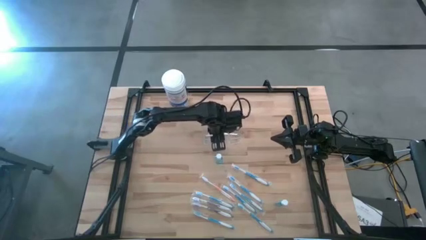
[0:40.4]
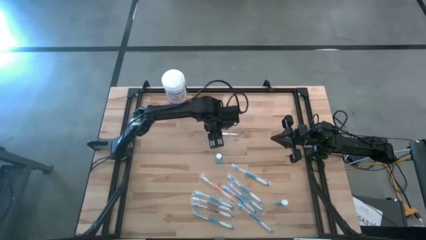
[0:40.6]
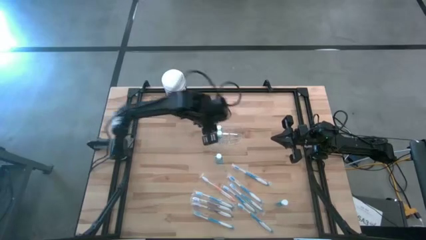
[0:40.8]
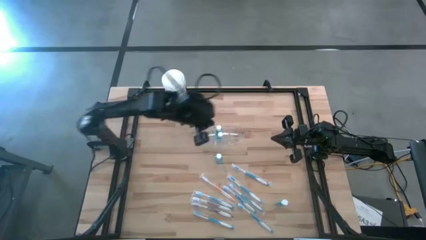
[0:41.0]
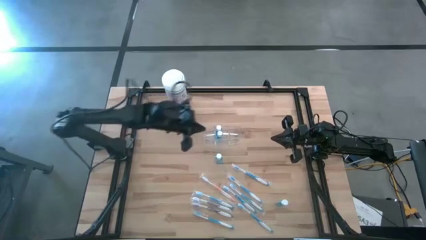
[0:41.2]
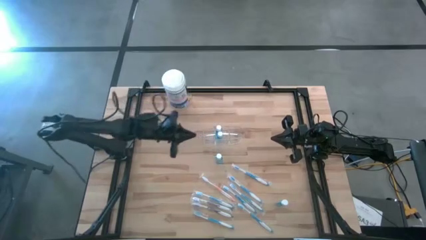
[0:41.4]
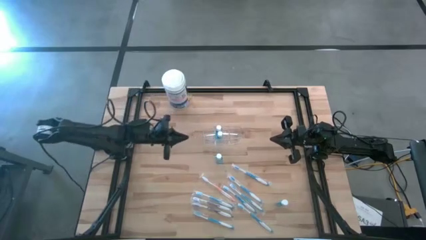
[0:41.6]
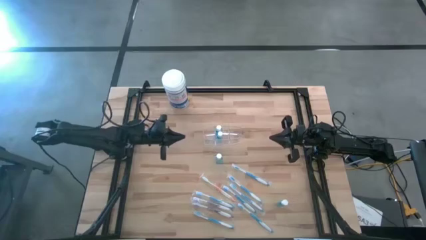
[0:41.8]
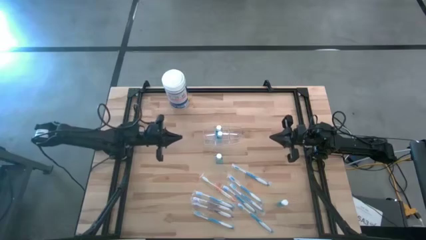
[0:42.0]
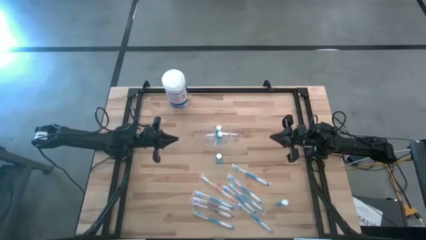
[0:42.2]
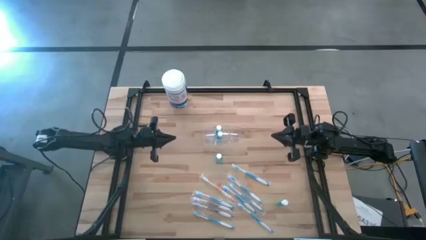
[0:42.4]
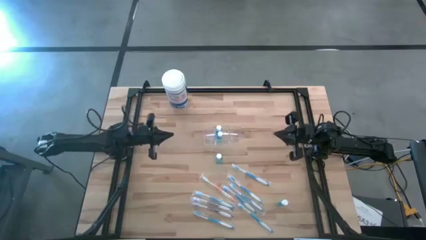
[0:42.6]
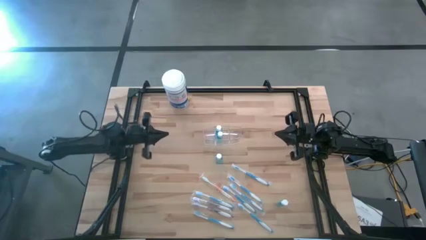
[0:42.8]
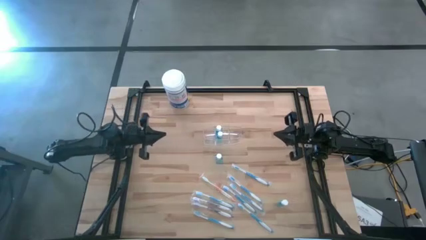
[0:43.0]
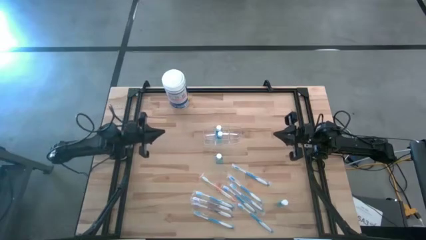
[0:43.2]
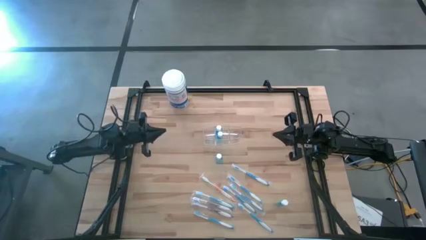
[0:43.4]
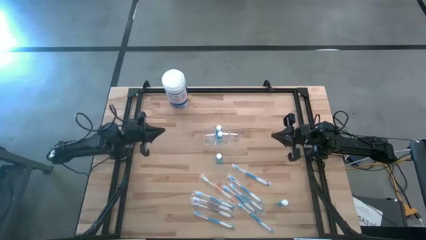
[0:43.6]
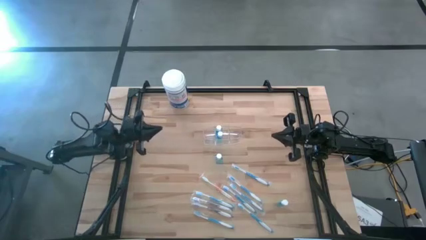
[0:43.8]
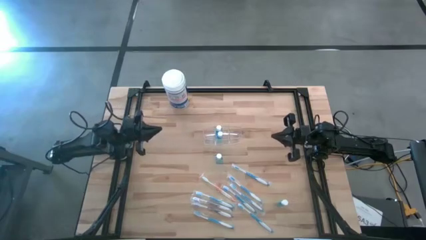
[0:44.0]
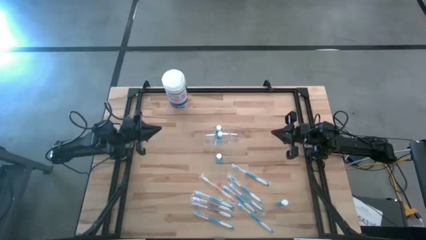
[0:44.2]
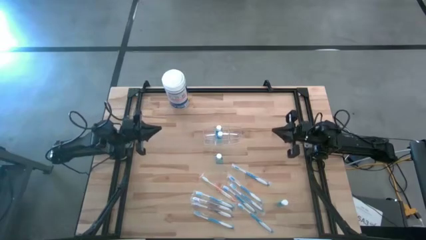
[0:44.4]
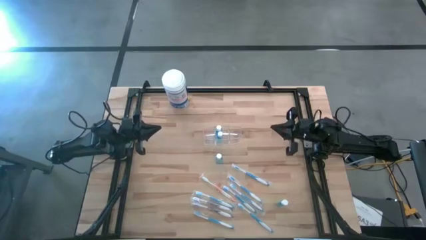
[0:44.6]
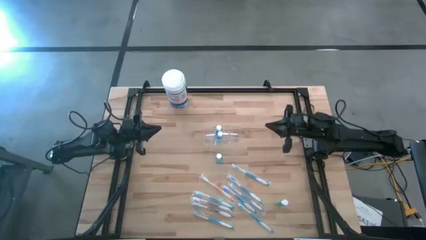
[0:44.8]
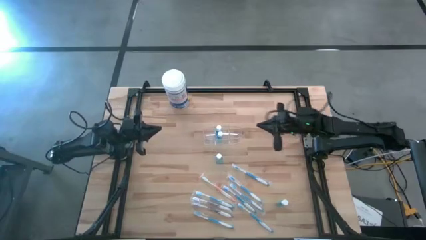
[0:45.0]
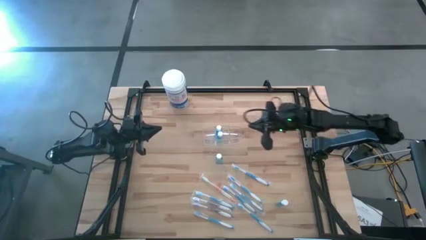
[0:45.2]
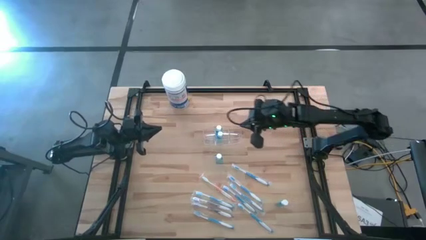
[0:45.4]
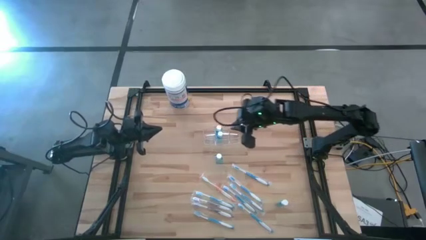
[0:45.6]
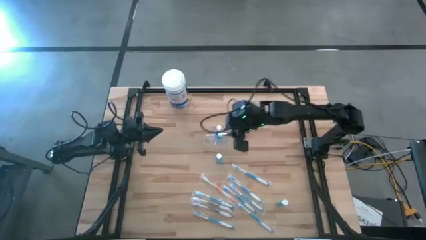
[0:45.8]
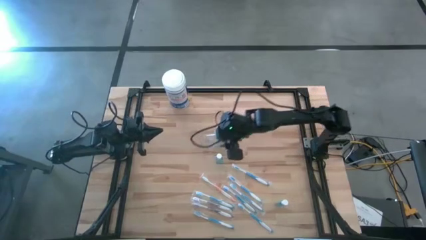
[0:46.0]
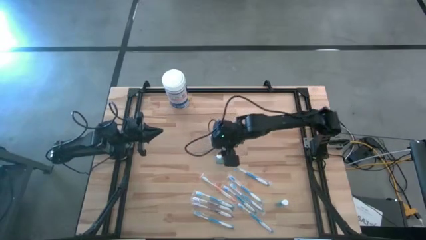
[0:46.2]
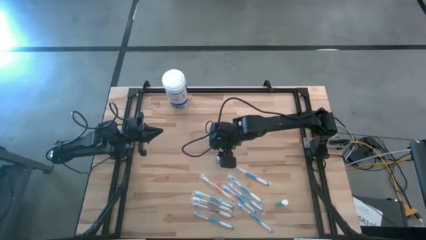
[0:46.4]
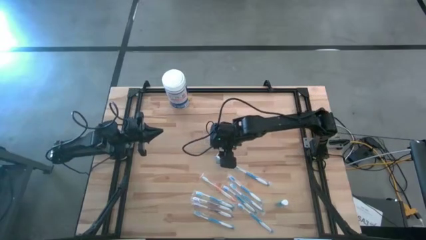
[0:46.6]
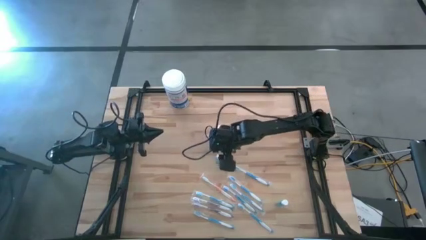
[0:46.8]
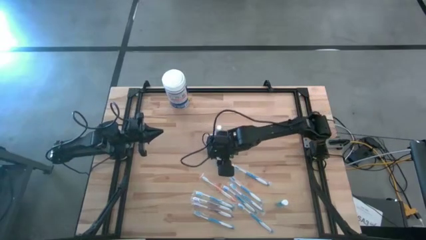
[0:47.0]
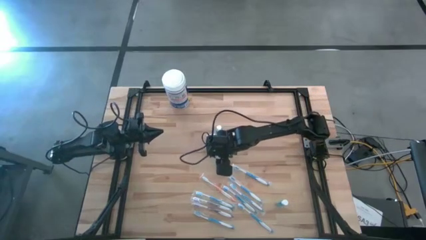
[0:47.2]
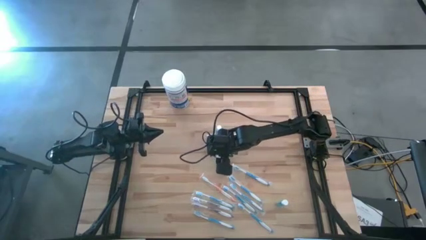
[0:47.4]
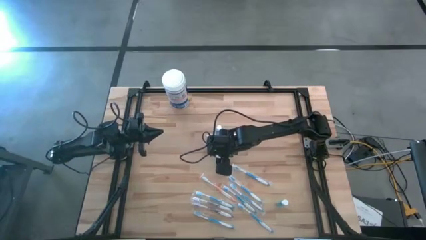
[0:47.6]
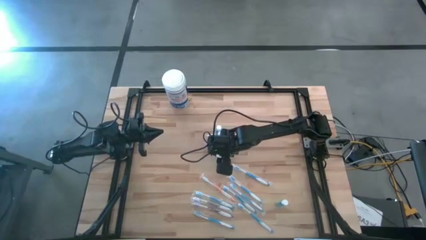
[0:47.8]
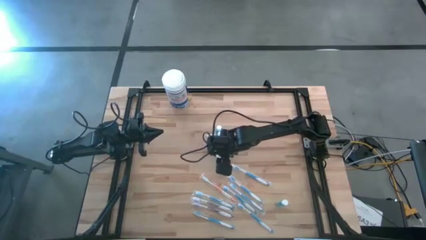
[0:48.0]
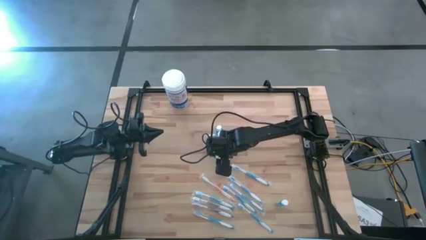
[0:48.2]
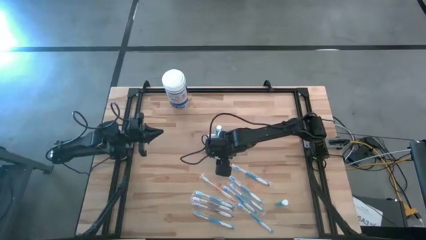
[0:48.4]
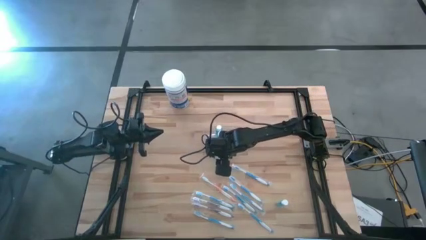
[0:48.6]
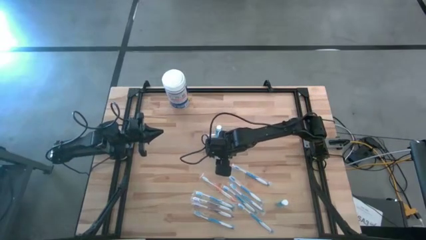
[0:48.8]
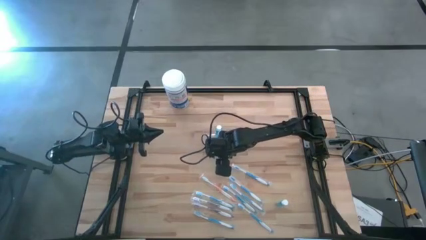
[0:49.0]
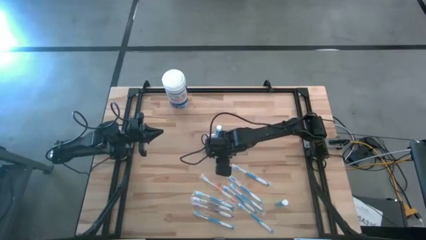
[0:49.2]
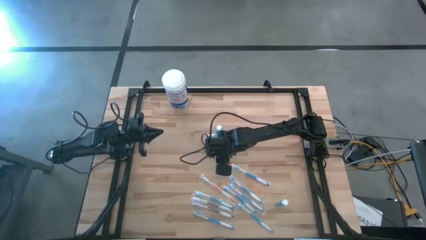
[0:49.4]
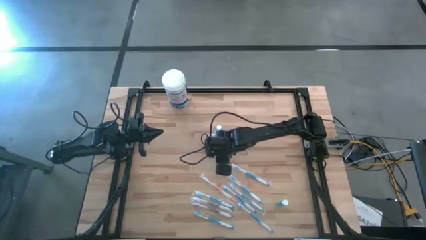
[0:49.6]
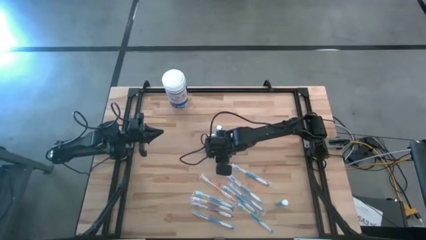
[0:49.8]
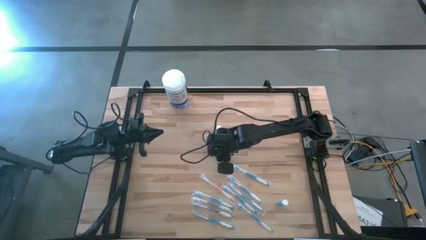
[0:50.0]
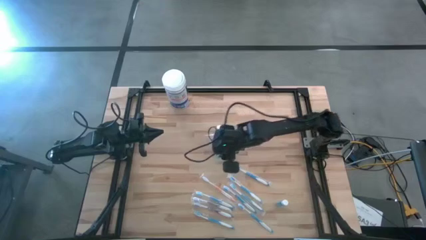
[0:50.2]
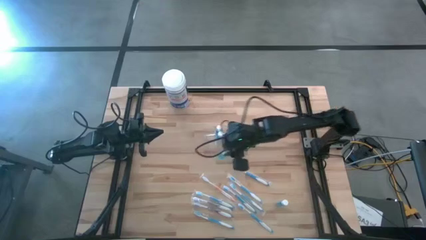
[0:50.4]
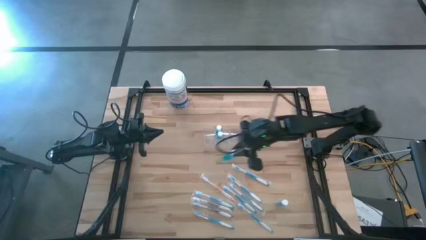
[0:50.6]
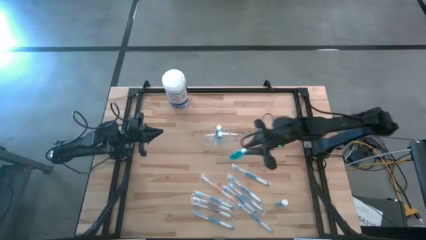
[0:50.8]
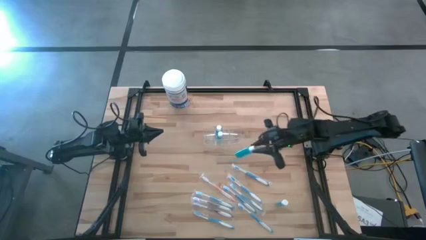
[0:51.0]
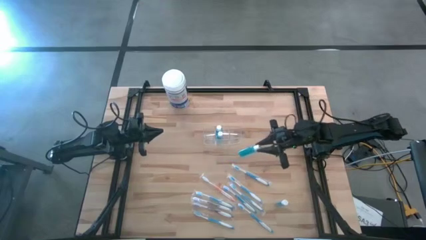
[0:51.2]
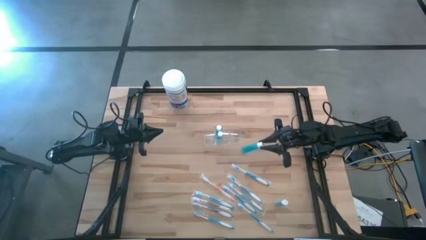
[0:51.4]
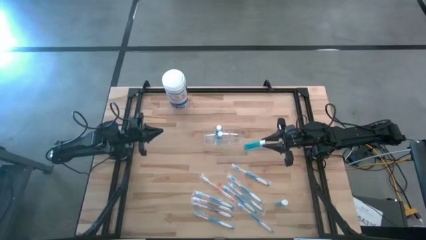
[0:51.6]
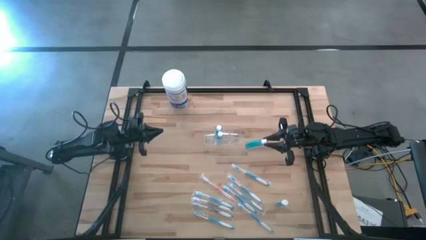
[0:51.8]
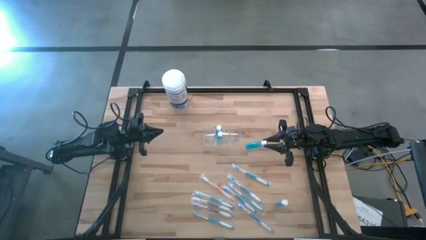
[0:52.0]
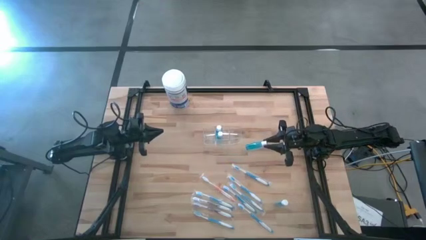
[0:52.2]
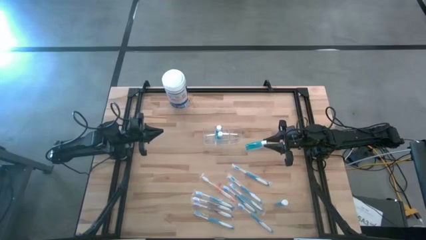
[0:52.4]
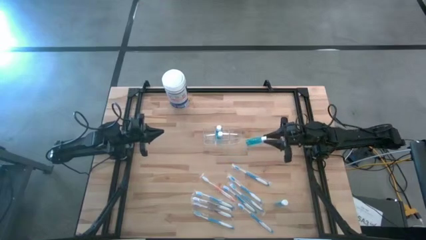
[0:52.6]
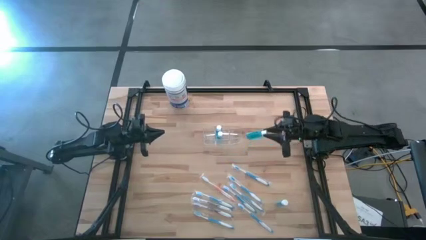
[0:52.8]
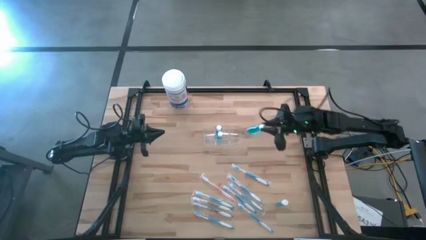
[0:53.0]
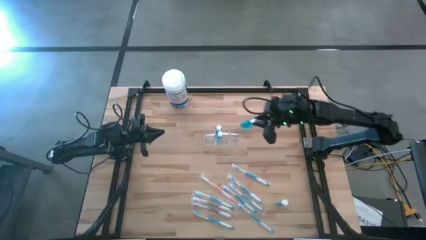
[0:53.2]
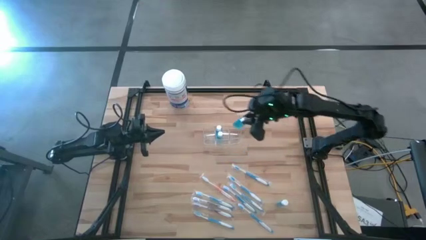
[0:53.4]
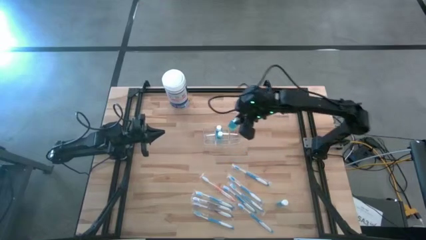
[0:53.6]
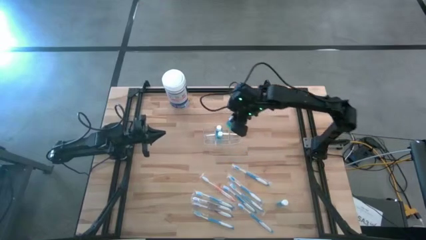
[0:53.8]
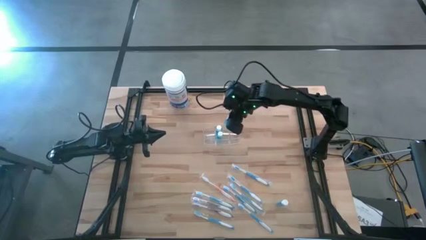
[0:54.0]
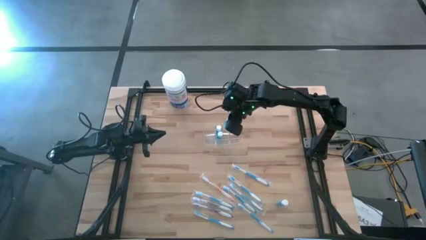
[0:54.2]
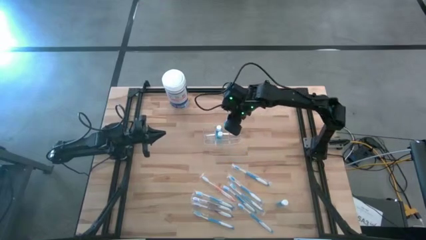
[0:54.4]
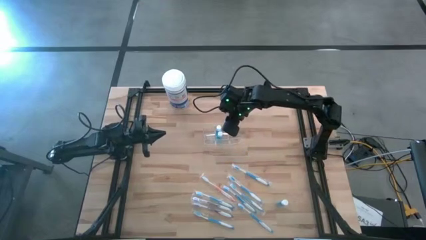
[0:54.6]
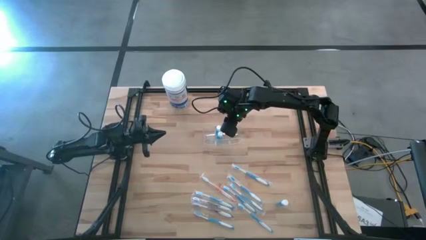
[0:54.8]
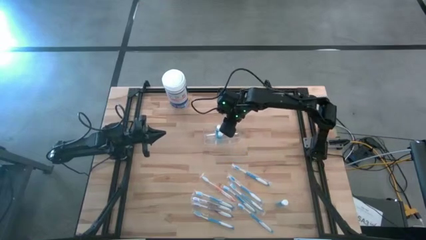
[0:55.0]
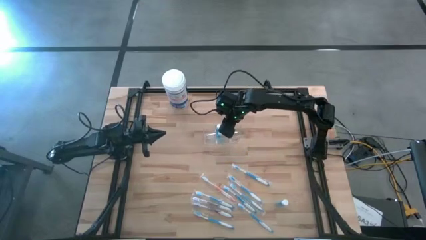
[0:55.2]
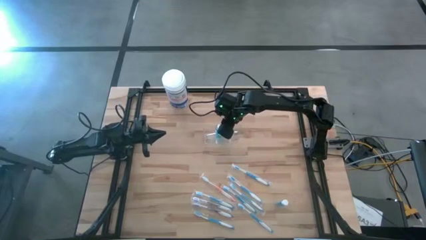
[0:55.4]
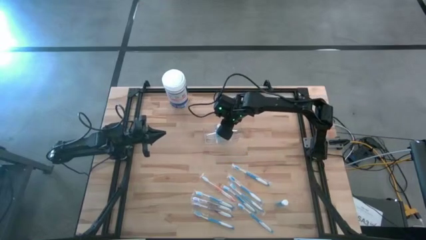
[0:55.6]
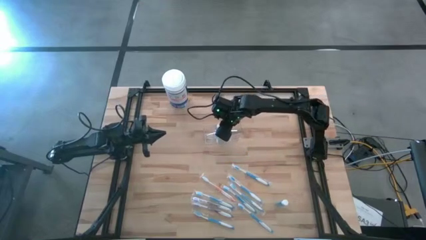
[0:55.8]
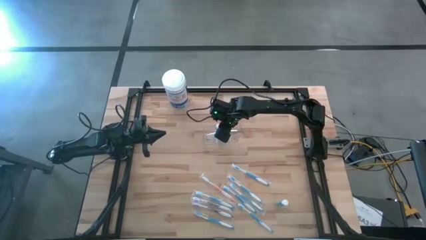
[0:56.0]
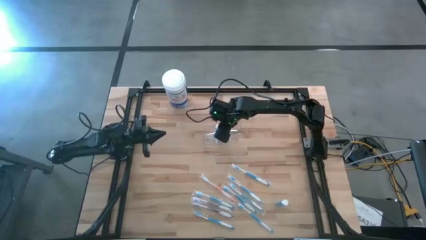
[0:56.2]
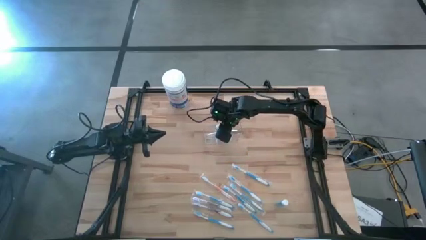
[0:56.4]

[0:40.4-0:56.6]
Task: Pick & Place toothbrushing station
Put the blue mouthwash in the transparent organizer
